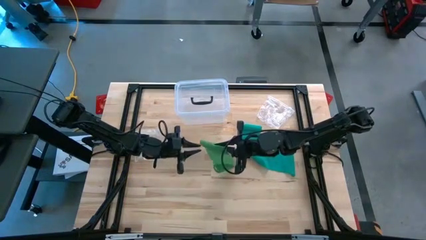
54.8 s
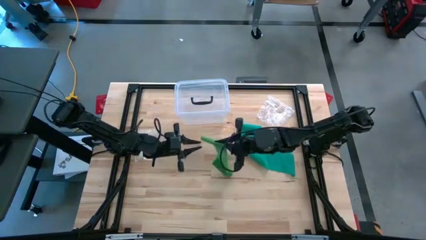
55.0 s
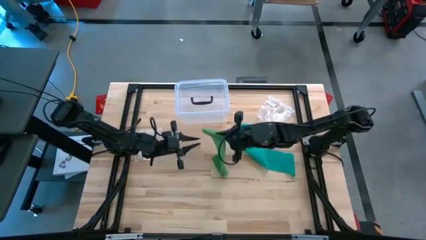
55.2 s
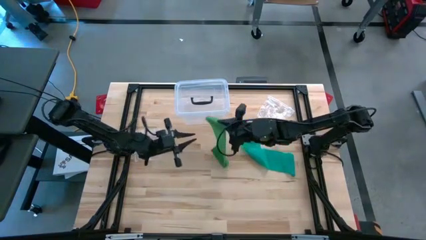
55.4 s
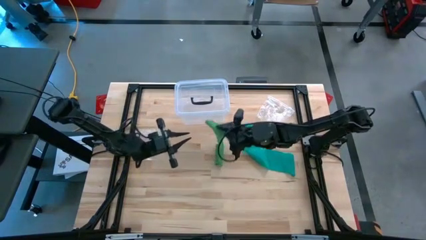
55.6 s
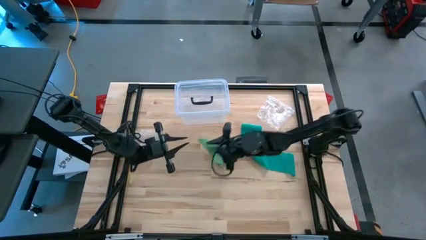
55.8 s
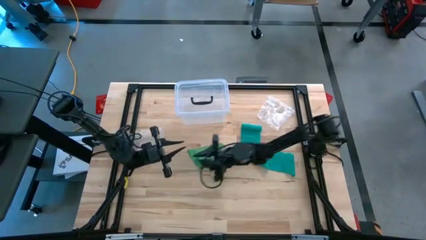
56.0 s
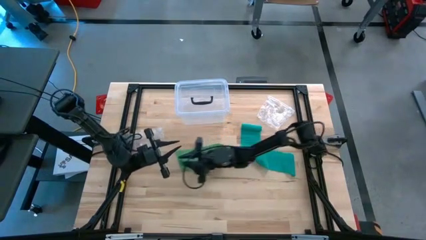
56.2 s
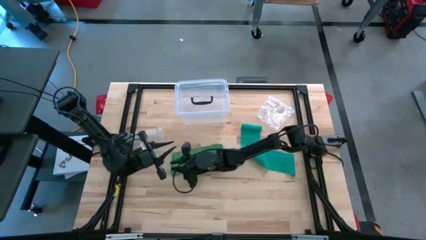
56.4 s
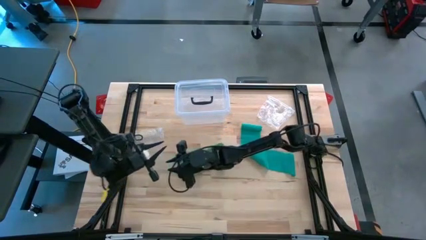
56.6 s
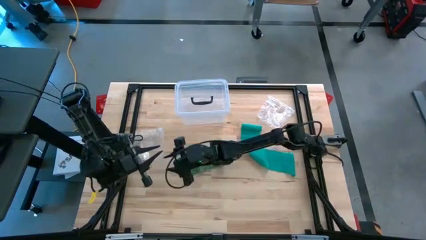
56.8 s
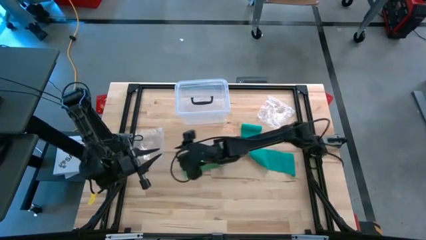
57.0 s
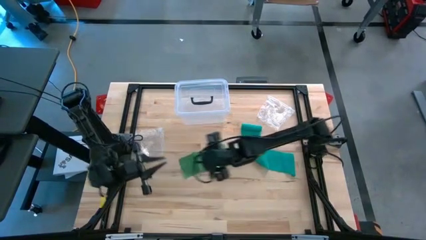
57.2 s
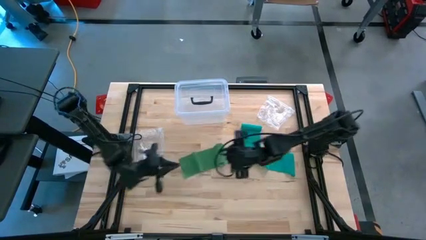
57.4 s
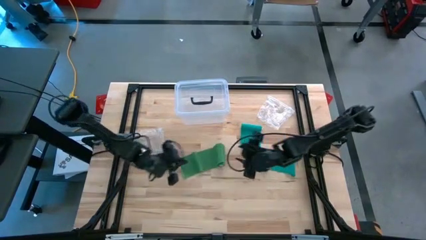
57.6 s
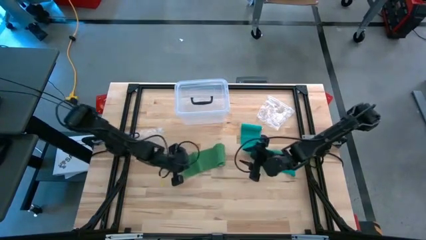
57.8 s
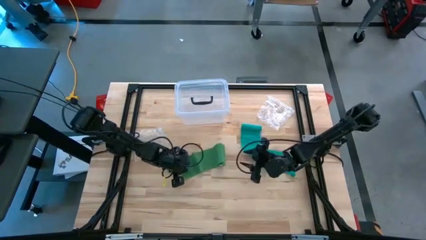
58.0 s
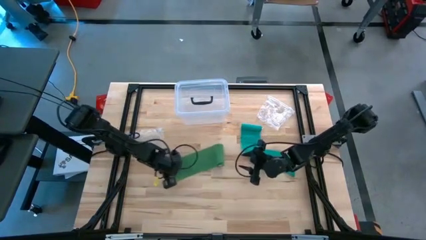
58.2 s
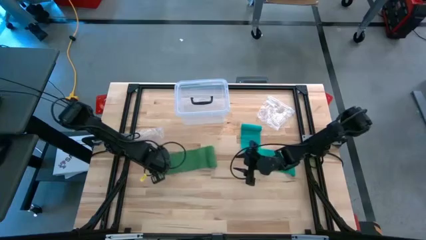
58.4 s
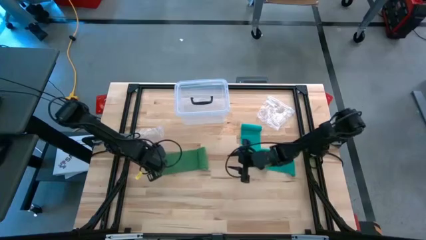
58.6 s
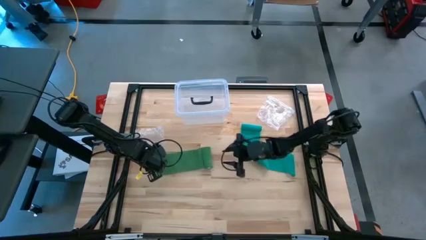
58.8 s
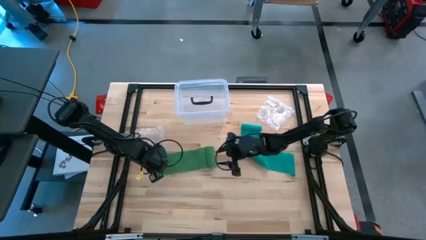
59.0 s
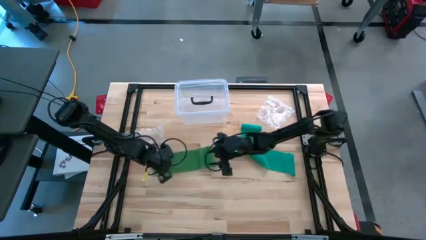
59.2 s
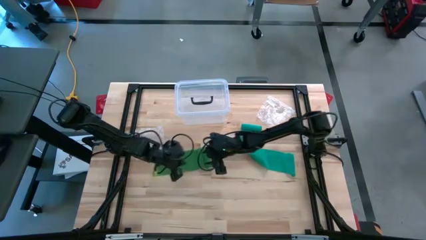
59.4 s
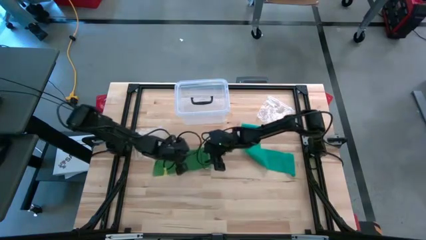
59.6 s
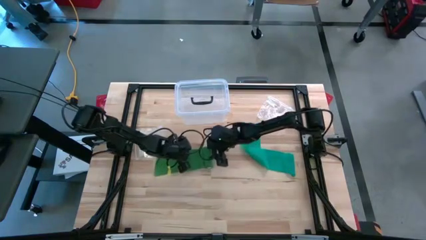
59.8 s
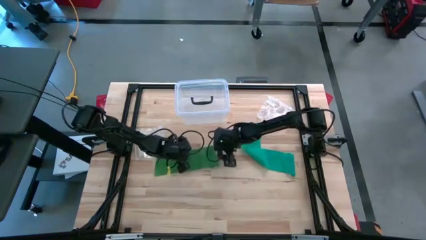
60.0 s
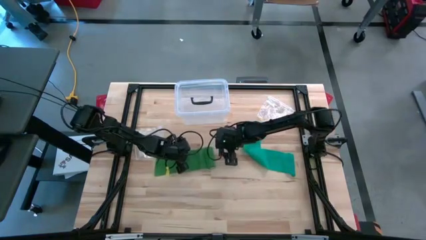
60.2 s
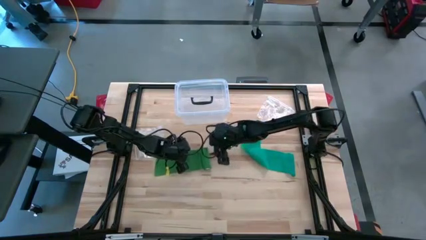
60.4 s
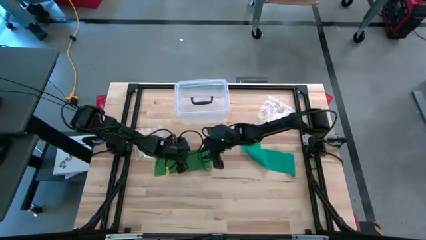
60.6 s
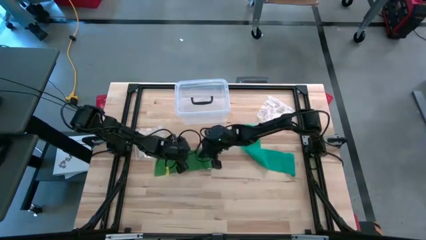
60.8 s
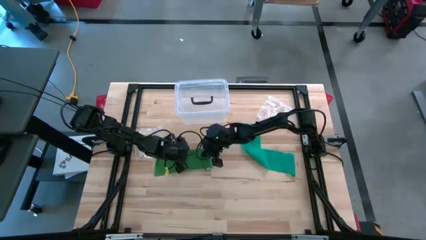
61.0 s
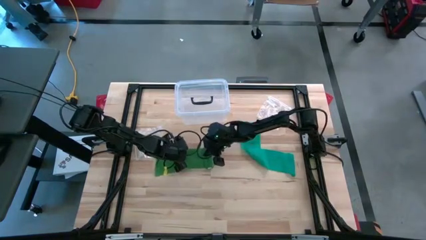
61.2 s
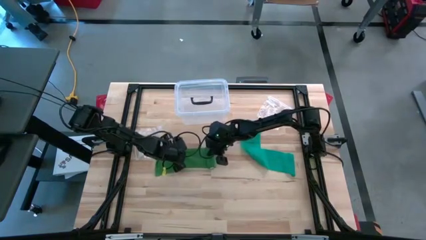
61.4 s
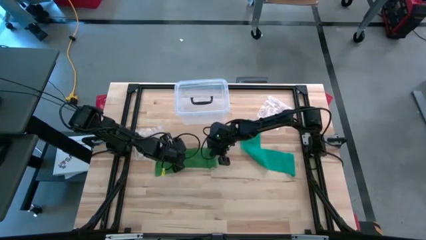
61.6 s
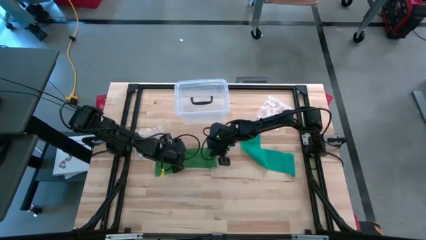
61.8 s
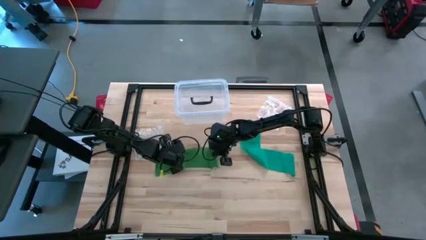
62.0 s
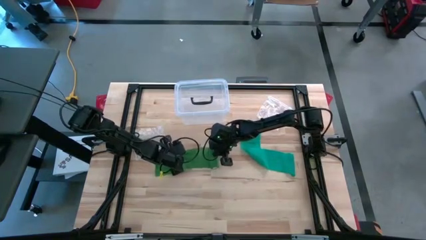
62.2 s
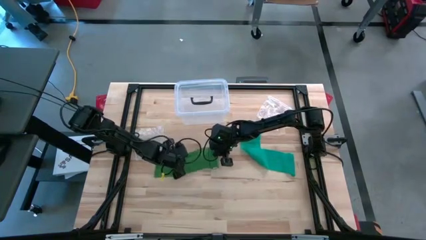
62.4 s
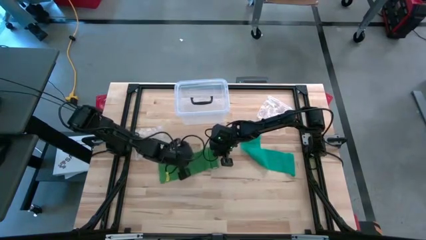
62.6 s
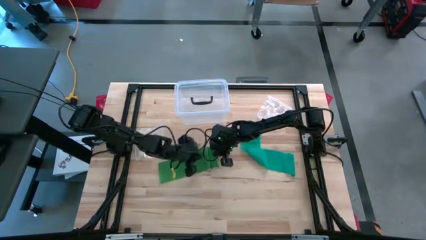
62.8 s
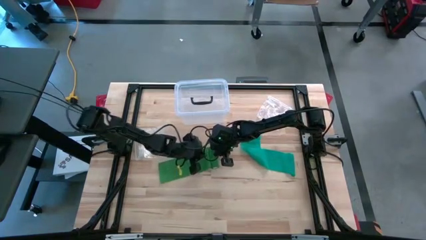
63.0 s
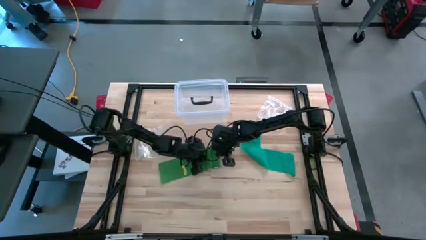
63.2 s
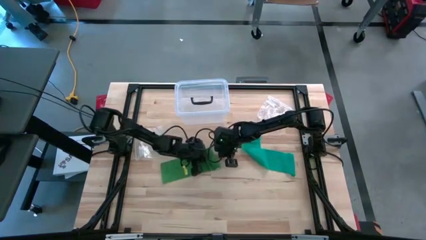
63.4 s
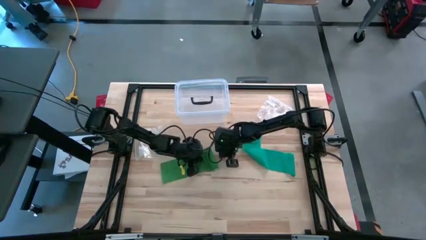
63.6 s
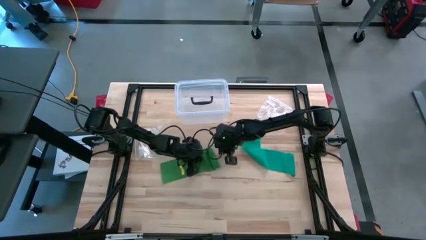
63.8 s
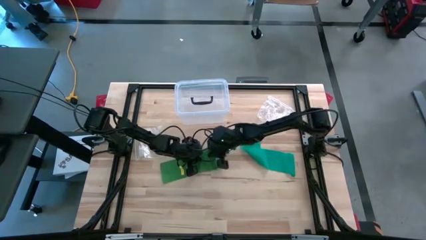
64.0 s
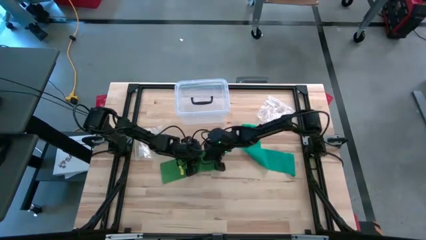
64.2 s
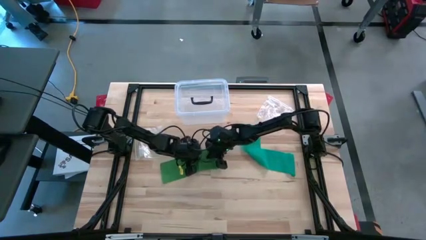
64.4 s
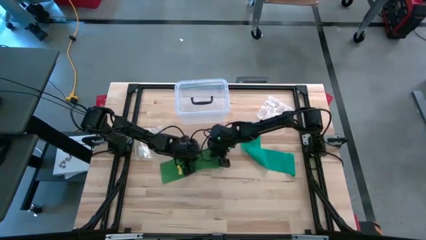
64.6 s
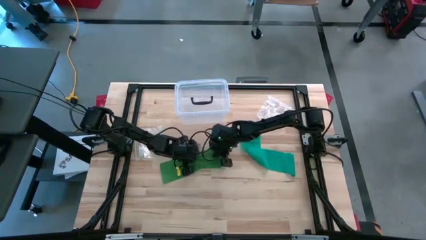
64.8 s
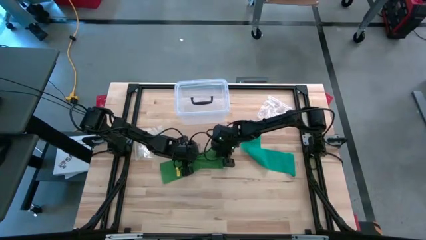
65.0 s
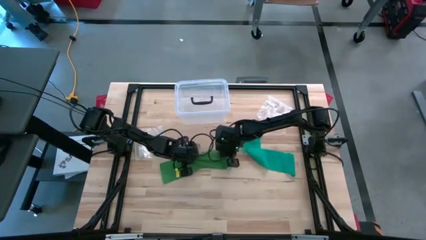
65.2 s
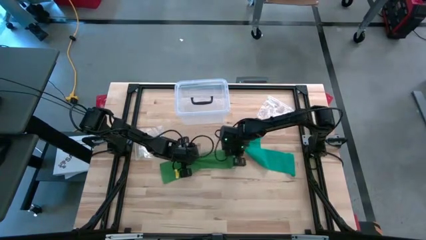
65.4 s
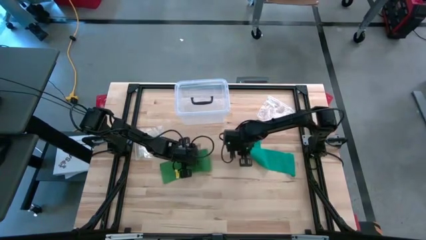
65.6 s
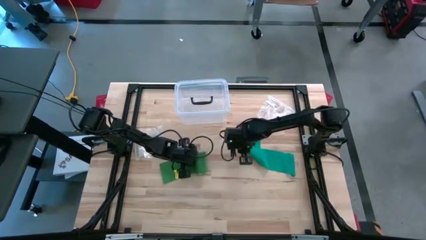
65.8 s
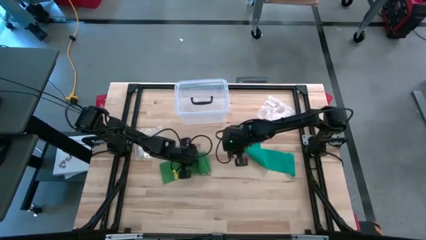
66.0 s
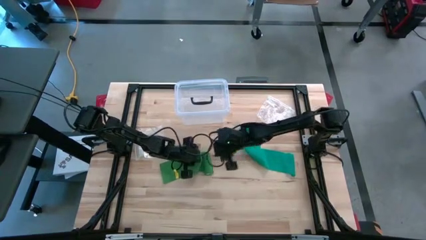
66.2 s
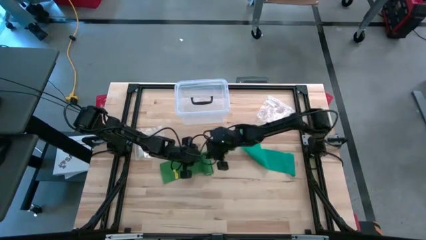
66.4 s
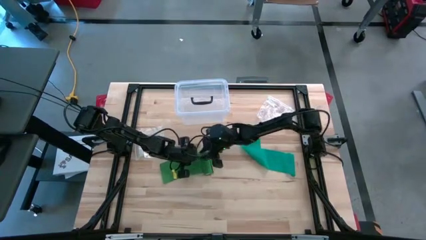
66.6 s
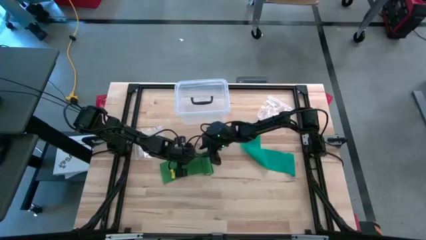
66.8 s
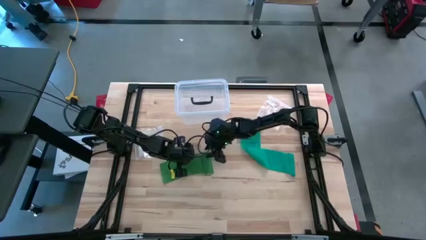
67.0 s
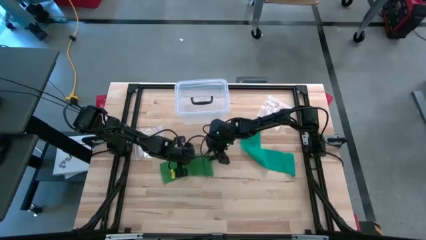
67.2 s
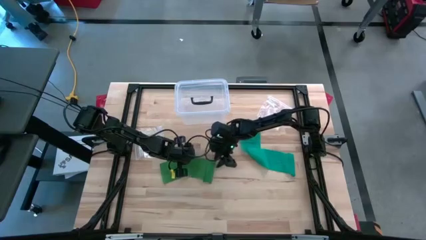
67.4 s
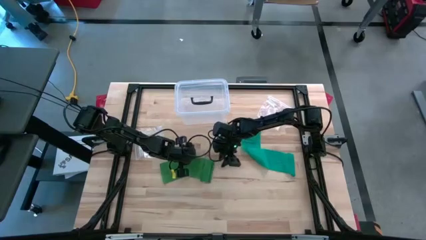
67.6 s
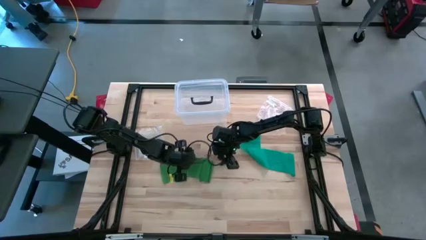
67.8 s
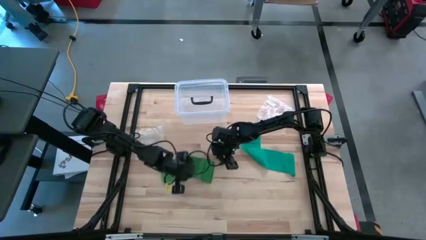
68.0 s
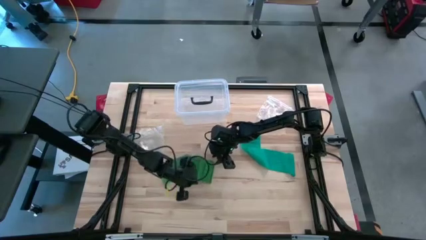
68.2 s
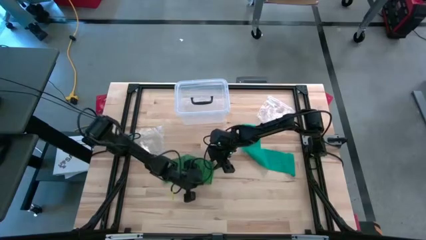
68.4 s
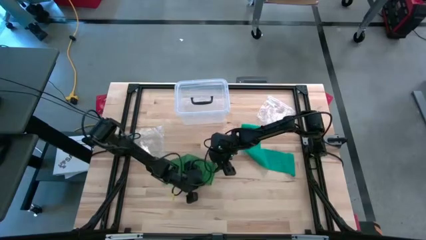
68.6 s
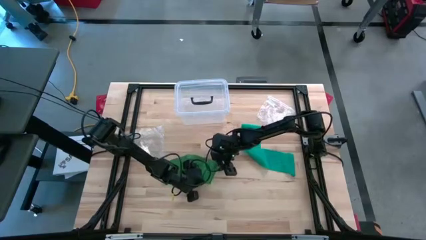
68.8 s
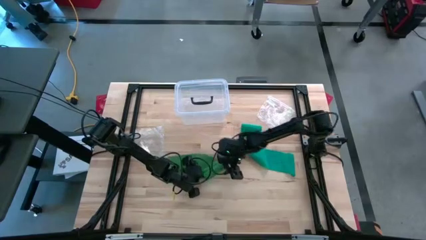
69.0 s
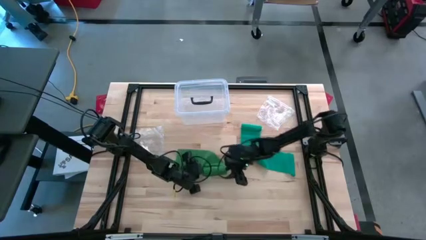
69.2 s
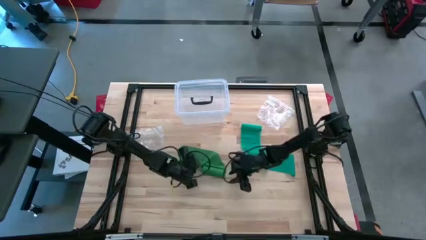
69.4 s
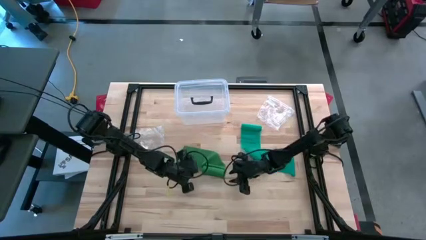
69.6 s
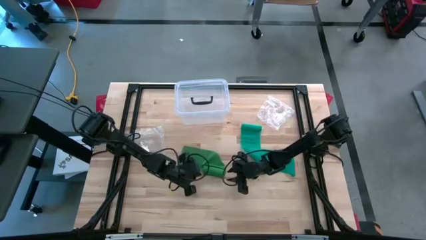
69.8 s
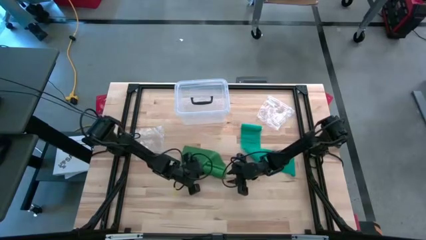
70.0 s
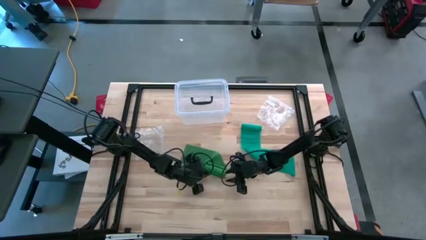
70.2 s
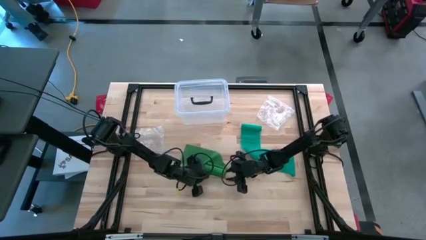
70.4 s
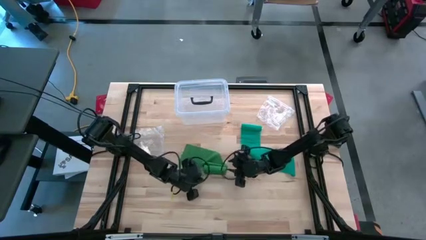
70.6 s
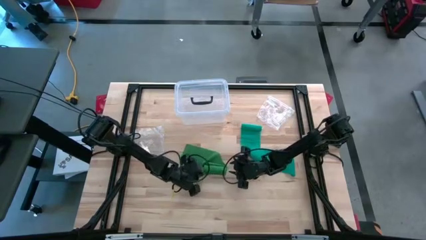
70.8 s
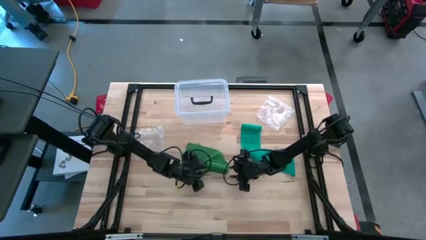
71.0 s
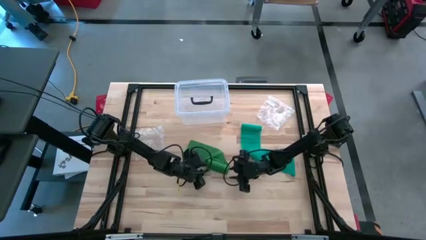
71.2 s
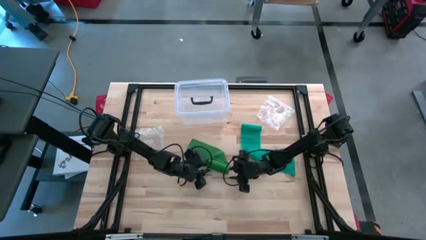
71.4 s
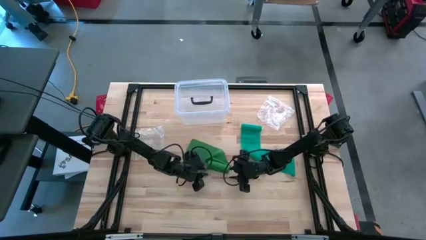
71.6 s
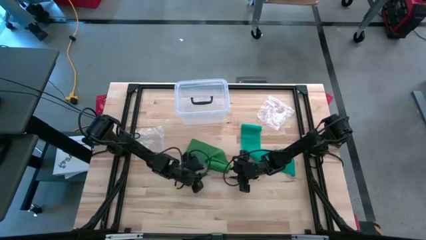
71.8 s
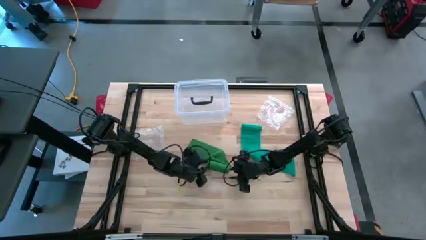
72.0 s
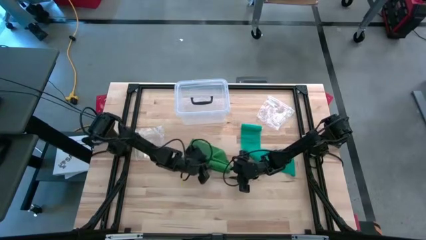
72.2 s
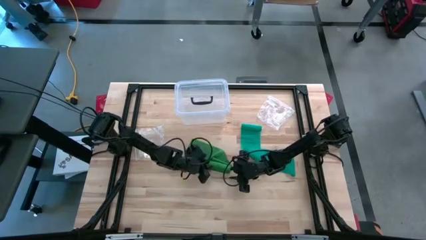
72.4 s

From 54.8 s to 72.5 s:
Task: Roll bandage
Roll the green bandage
